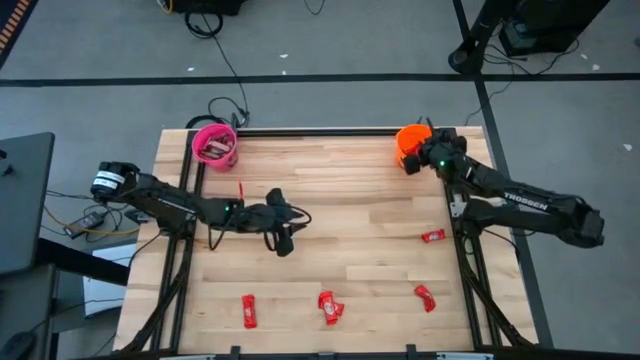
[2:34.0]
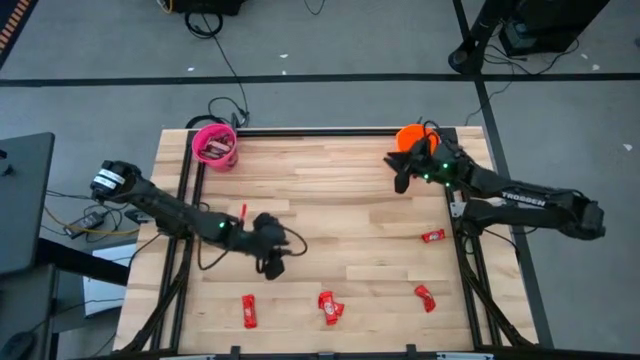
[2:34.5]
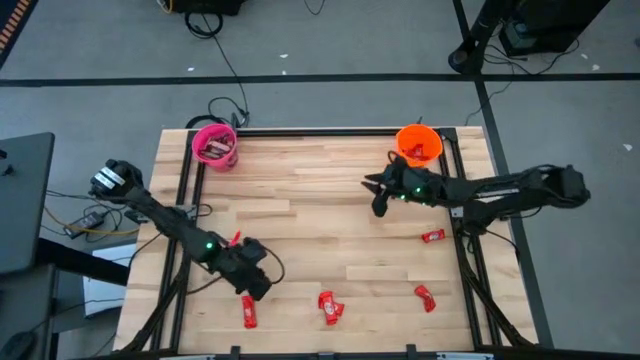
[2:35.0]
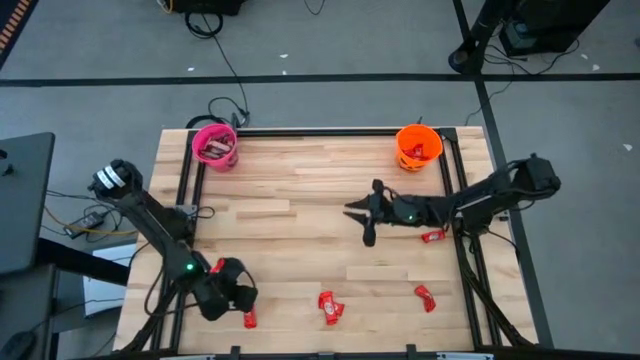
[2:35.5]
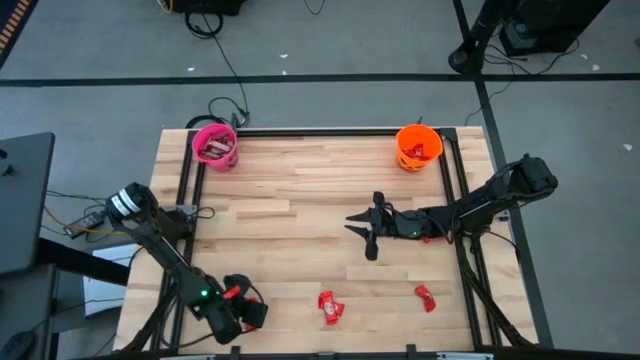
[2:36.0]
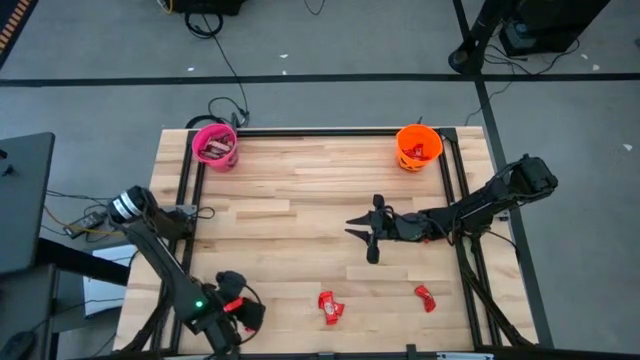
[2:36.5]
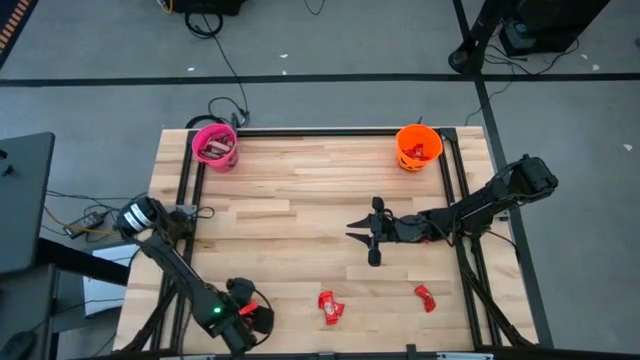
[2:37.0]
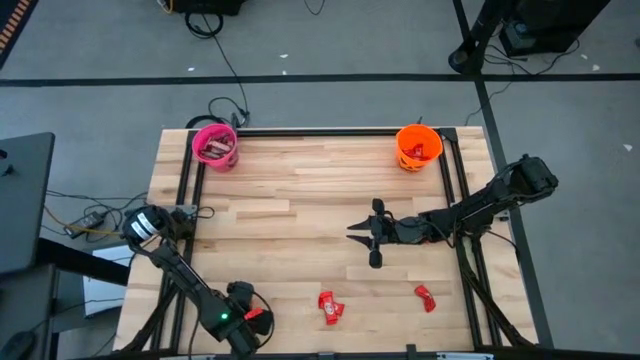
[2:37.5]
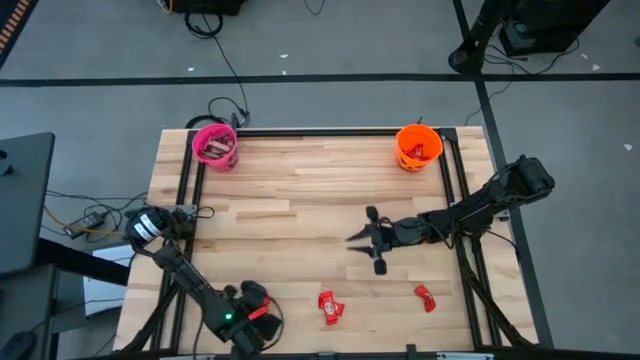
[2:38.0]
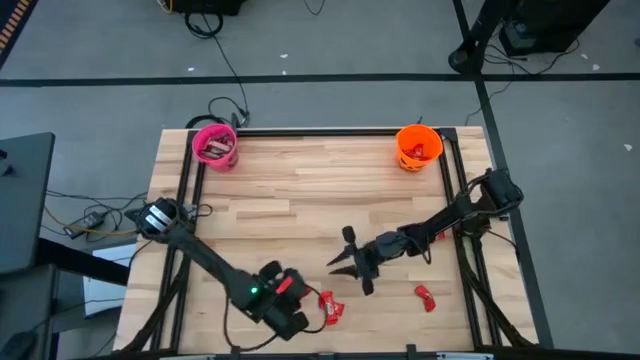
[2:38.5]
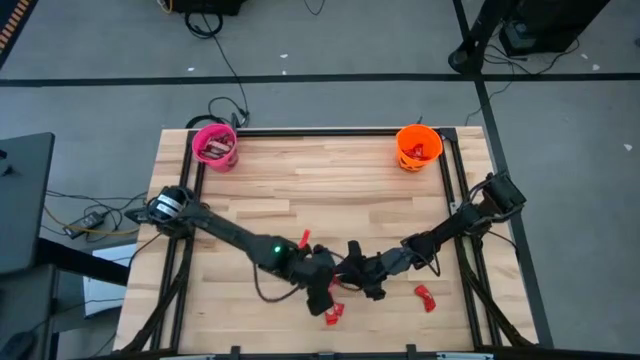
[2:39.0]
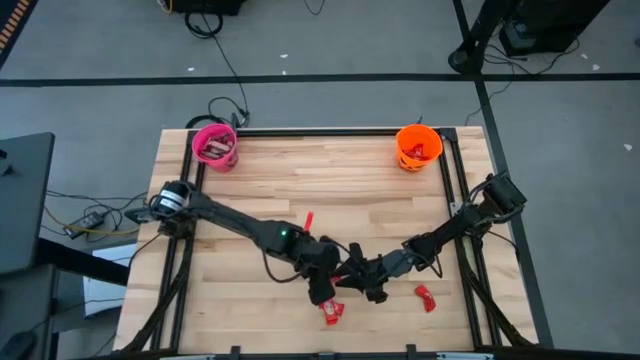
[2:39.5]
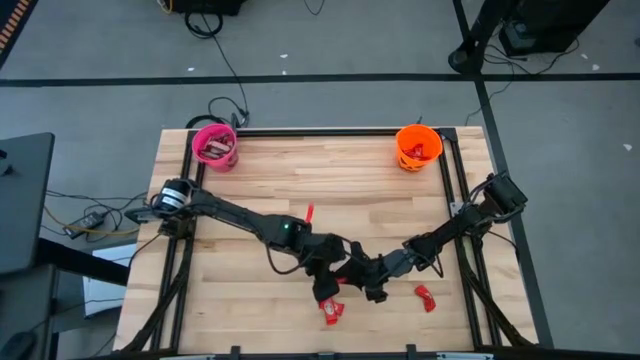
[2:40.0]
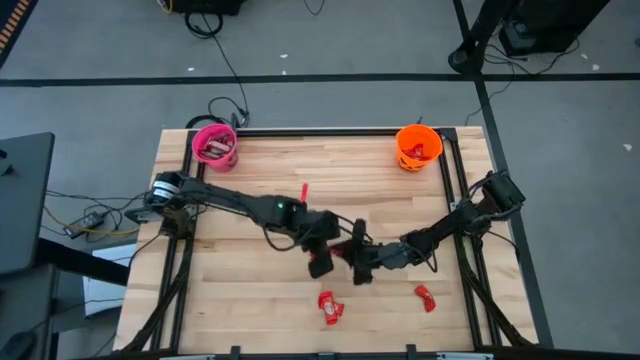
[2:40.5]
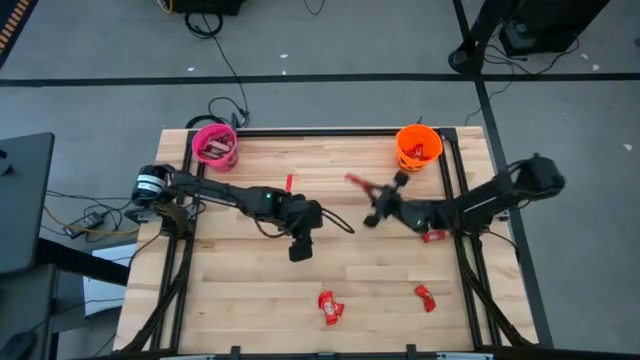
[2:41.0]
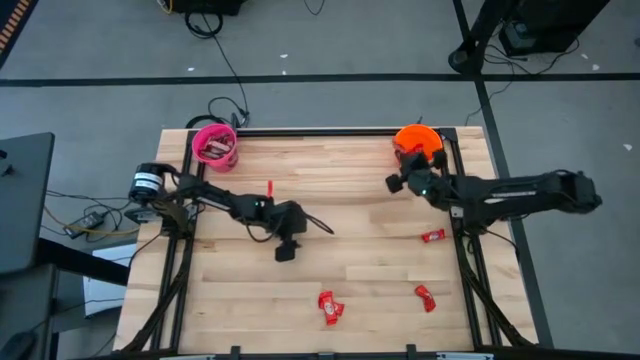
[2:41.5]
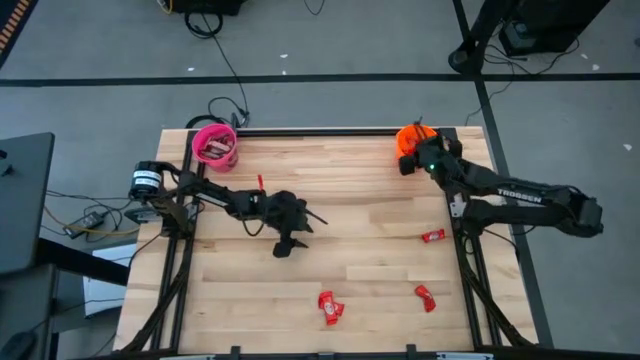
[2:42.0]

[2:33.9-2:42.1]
Task: Sort candy by brand, put in halloween buckets
Put the red chocolate bar into the orange bucket

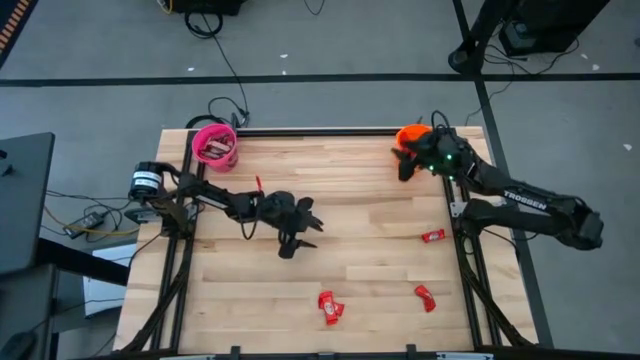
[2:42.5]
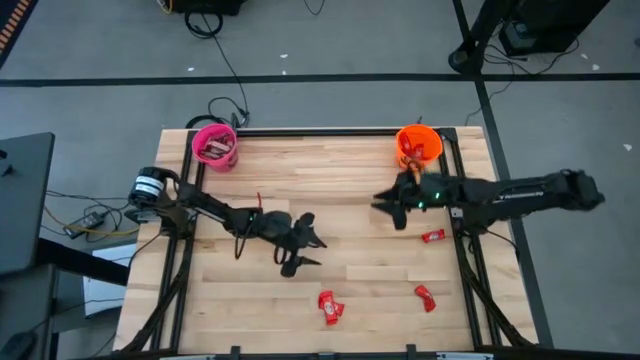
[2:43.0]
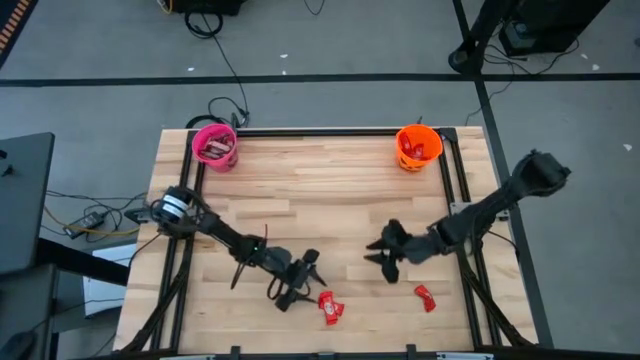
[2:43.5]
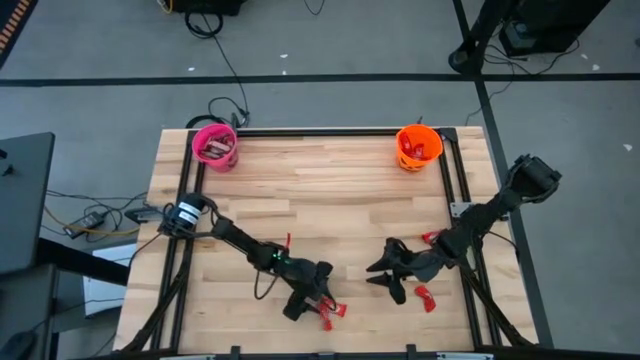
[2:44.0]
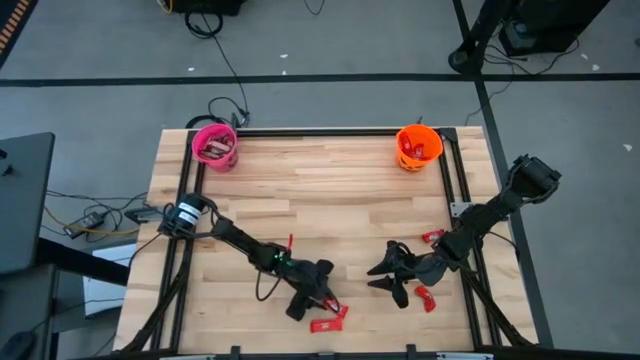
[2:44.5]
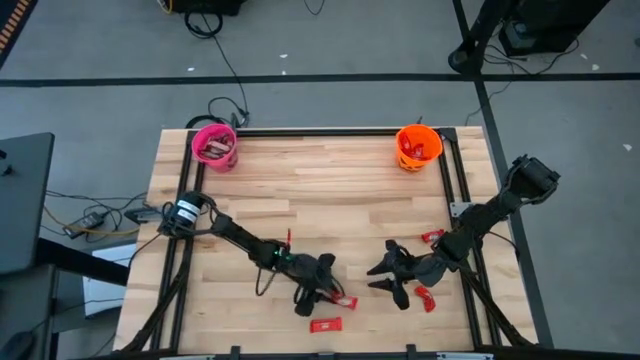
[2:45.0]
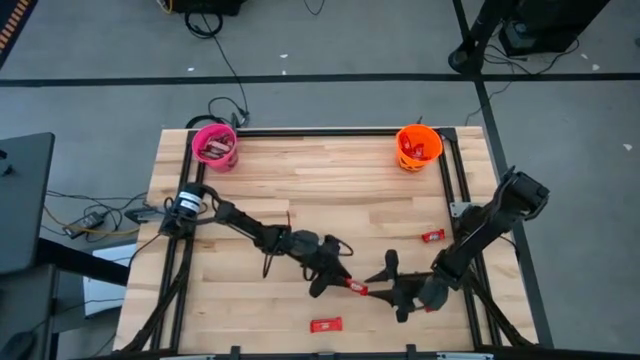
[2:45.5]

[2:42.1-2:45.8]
Put the red chocolate bar into the orange bucket

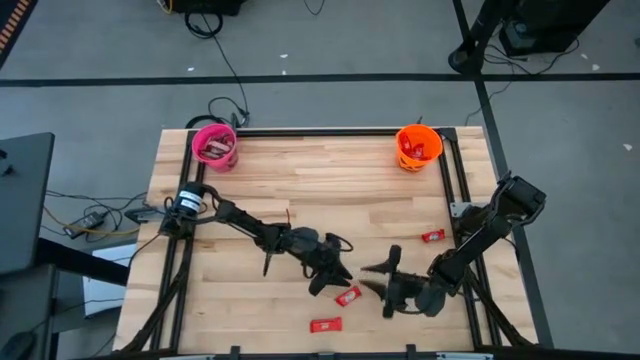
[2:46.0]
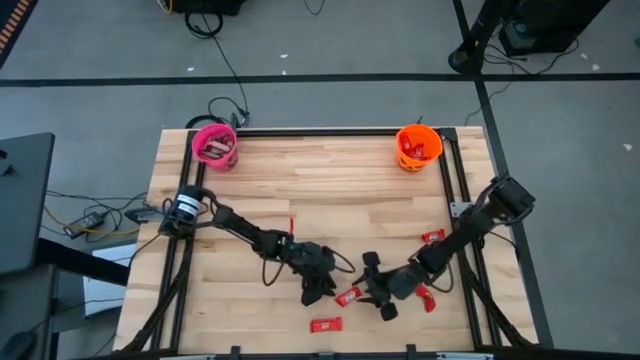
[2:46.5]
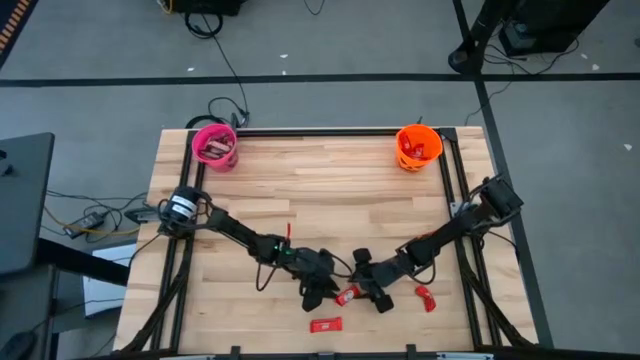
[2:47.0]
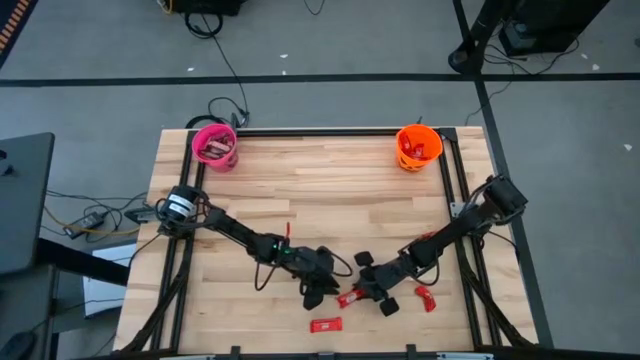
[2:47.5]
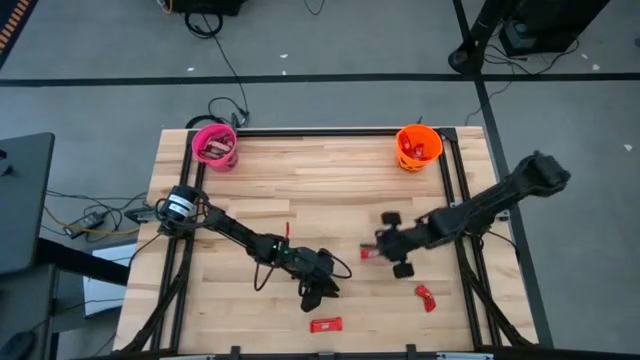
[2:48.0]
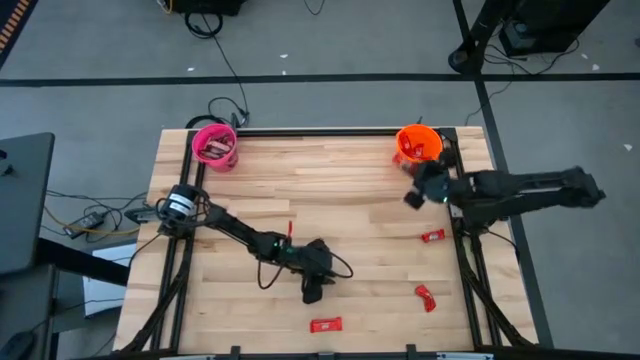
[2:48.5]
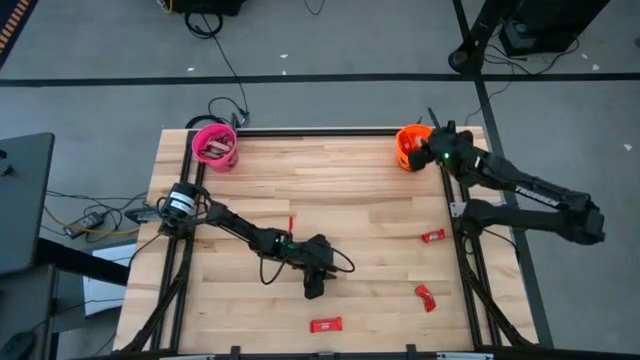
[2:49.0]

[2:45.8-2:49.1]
Put the red chocolate bar into the orange bucket

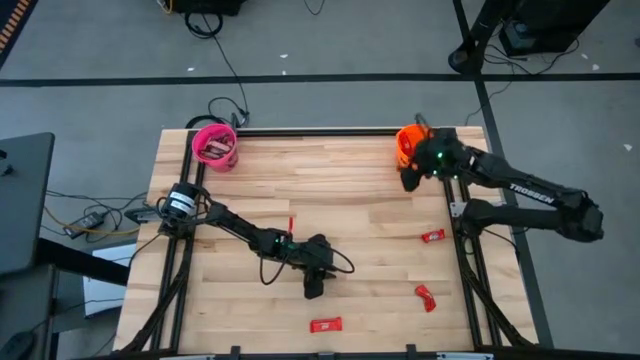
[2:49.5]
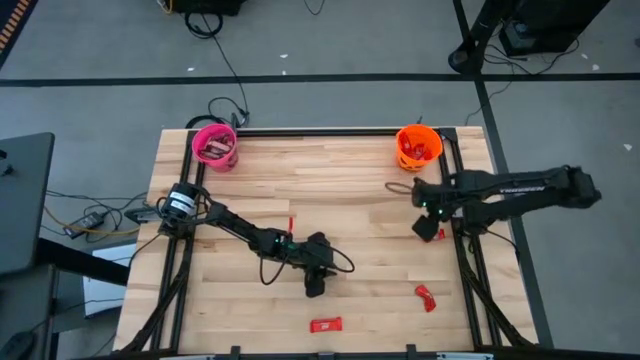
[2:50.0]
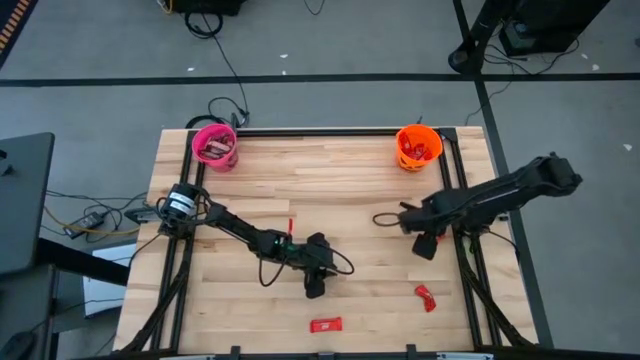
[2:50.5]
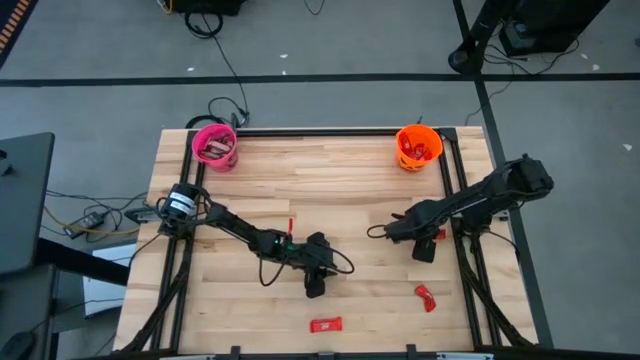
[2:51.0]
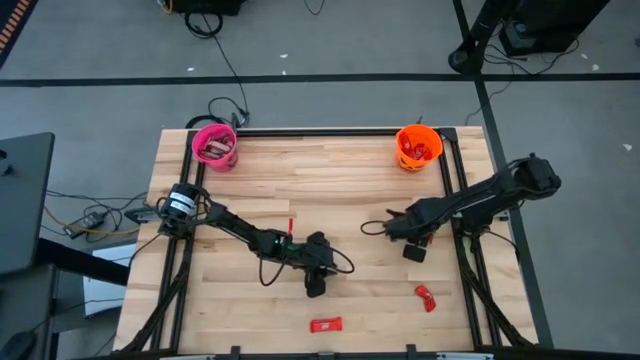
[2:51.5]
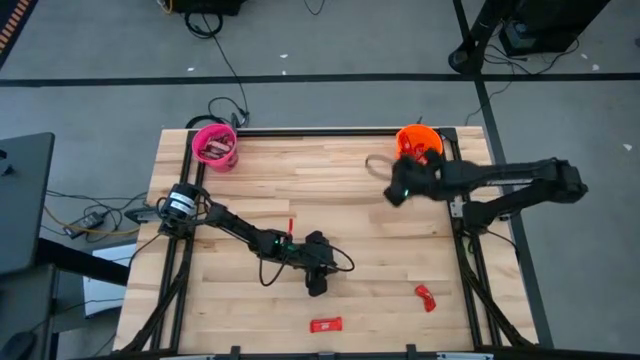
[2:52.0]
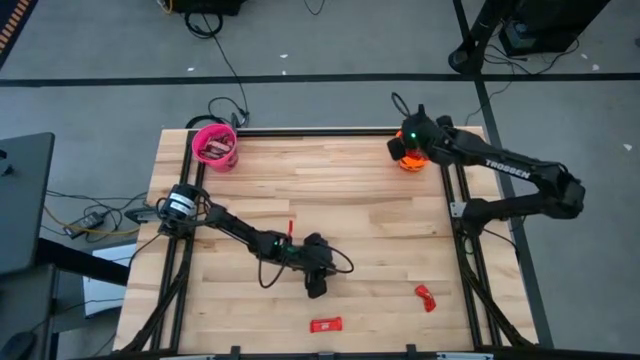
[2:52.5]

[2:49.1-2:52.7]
Put the top red chocolate bar into the orange bucket

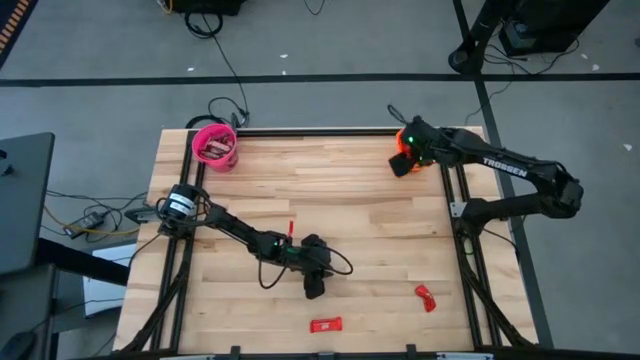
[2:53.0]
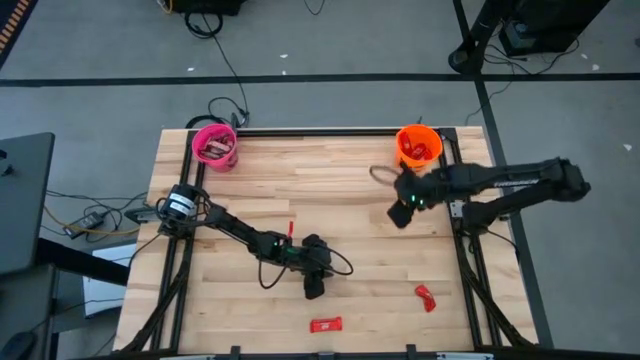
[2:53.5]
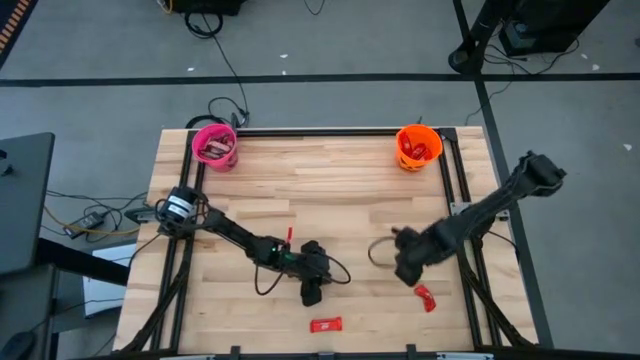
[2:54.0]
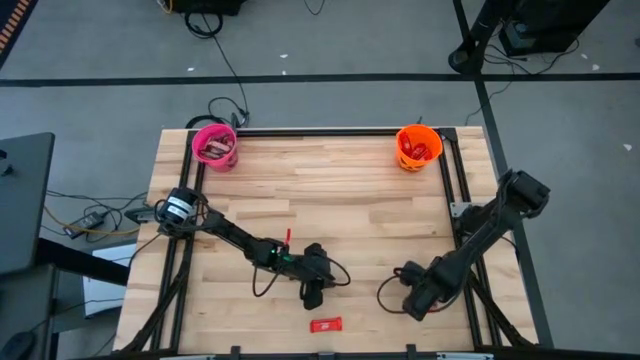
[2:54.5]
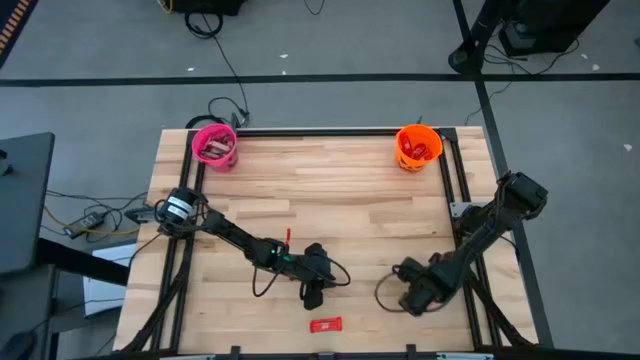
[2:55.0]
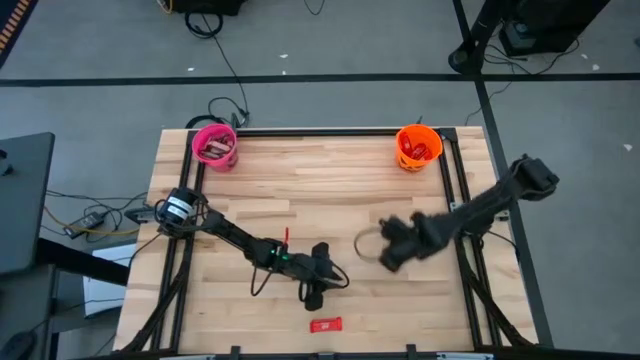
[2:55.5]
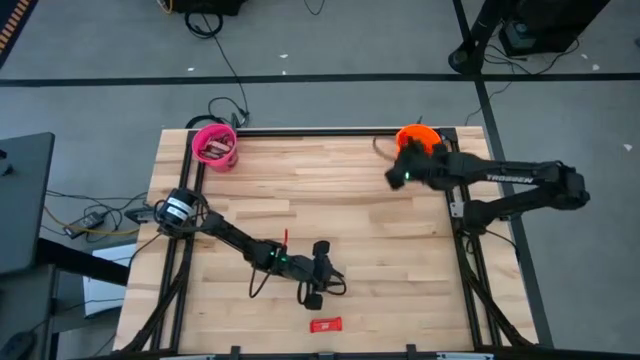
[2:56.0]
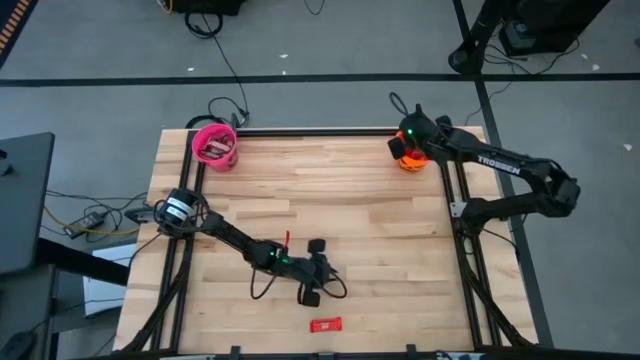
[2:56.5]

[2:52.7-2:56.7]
Put the right red chocolate bar into the orange bucket
